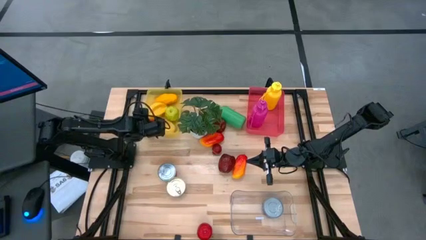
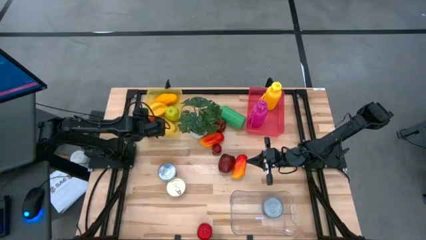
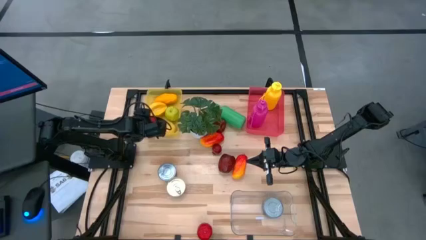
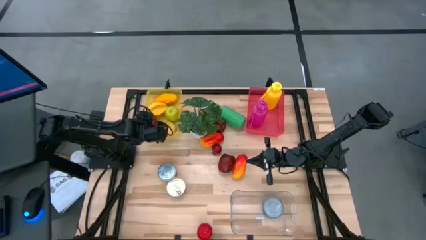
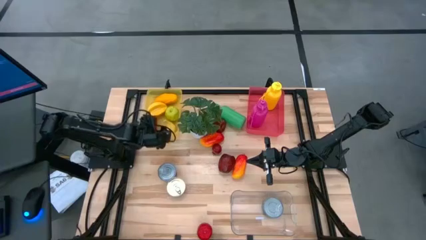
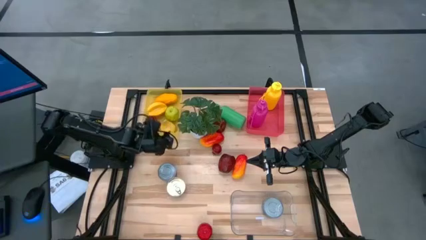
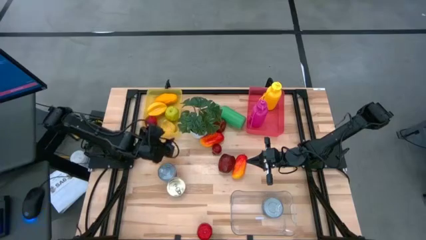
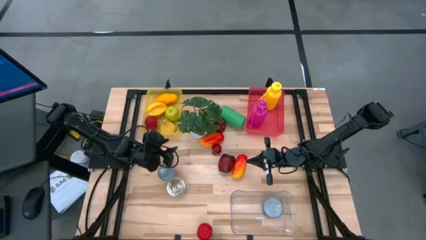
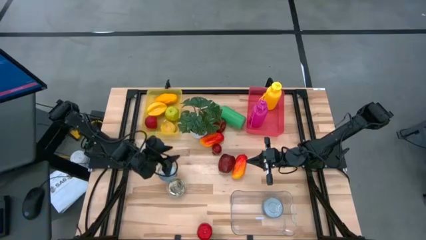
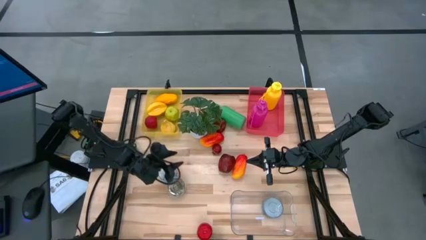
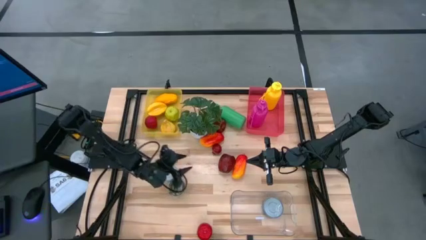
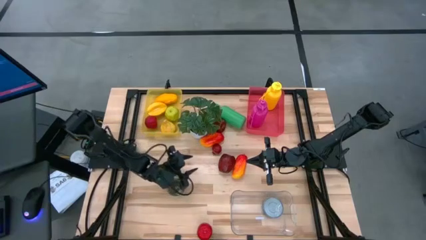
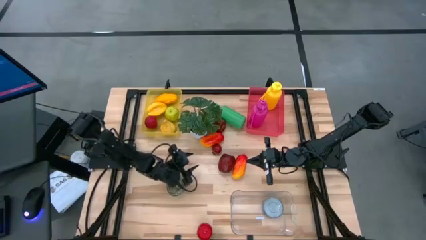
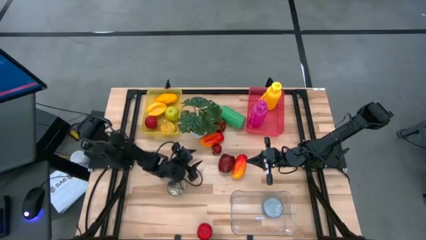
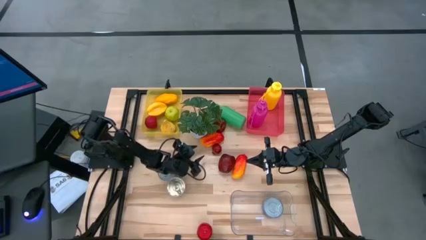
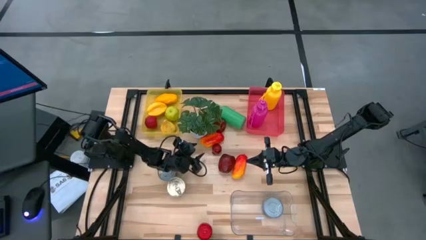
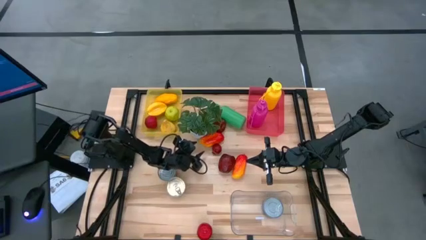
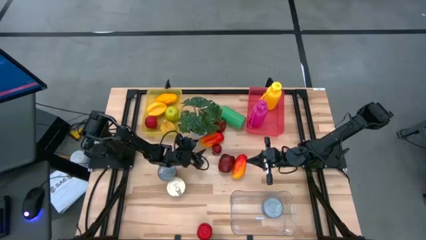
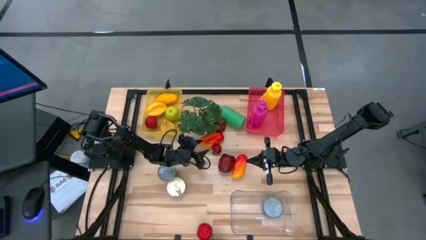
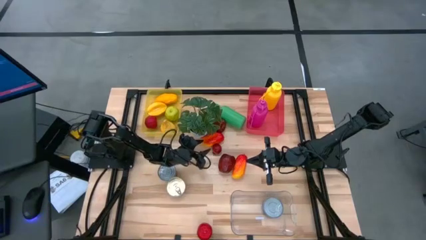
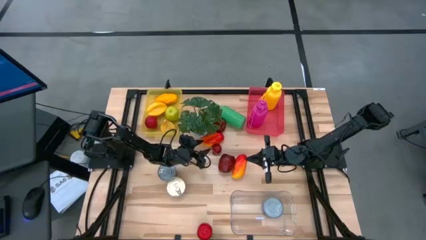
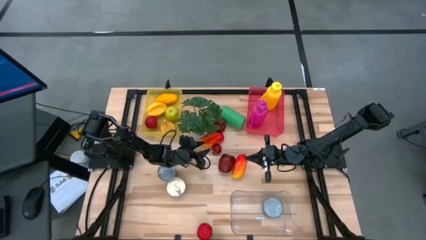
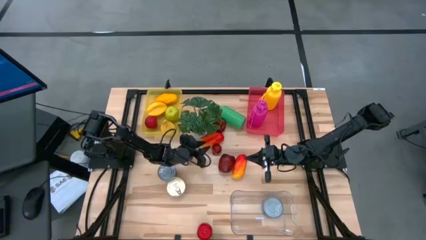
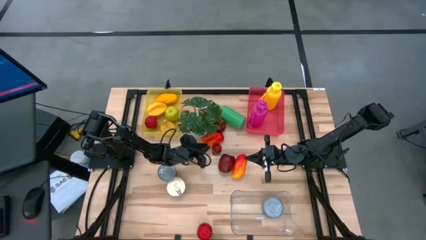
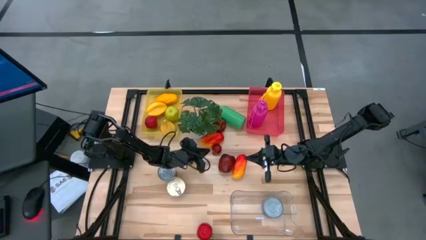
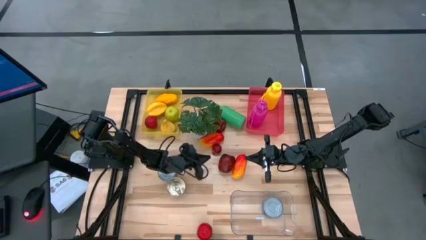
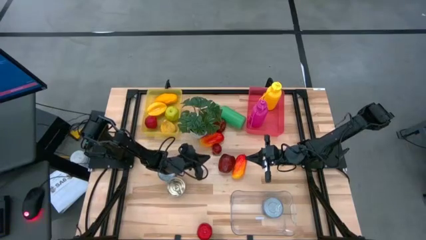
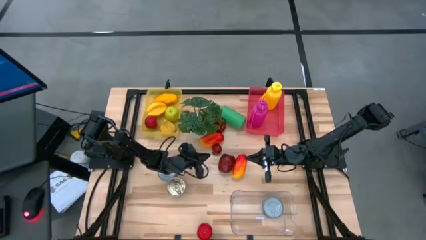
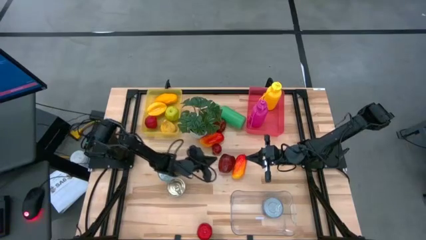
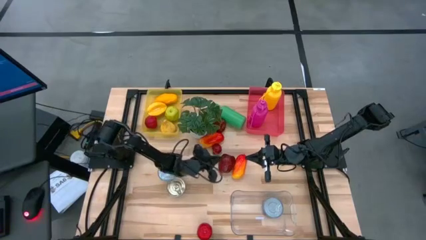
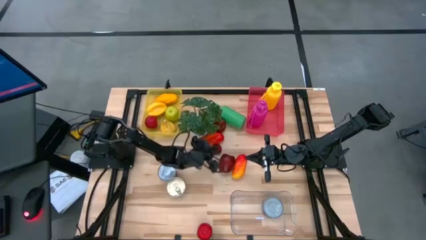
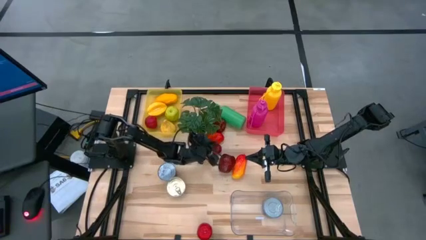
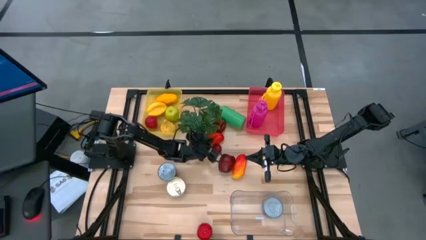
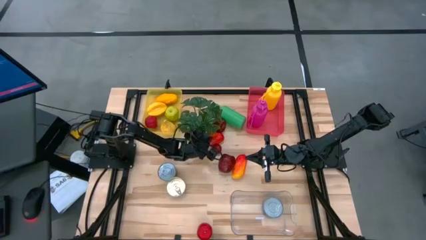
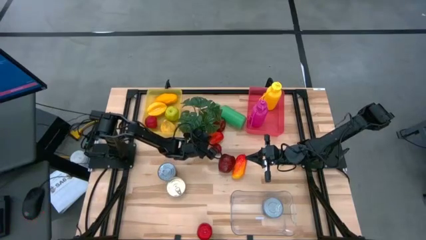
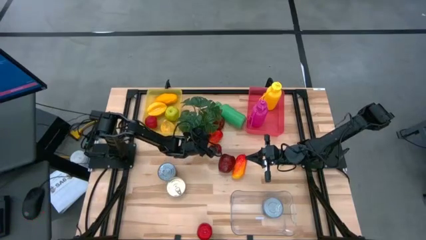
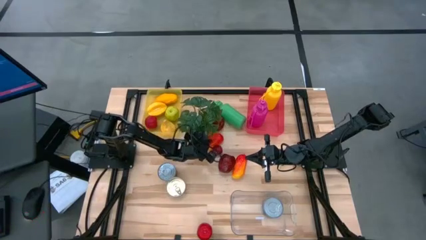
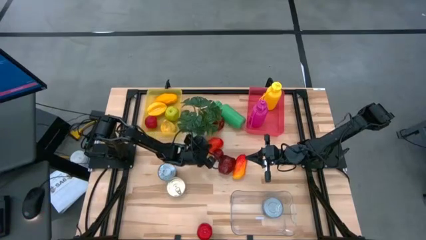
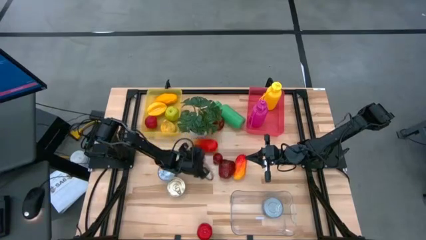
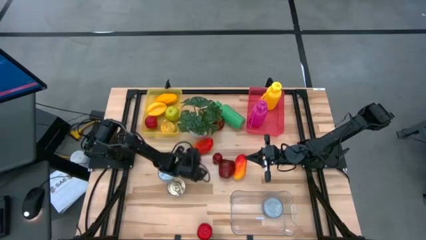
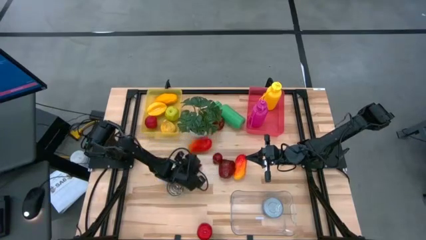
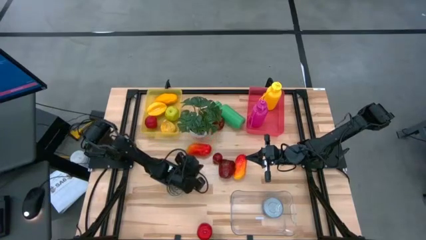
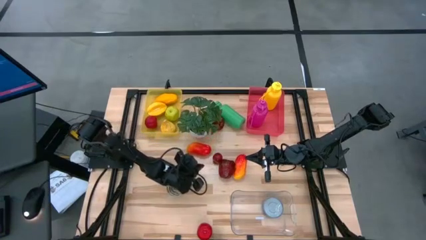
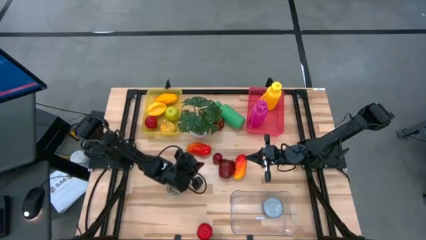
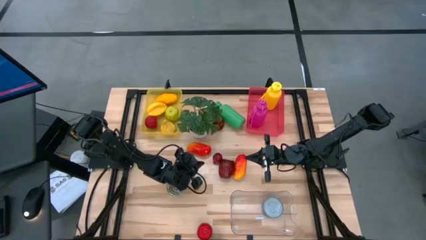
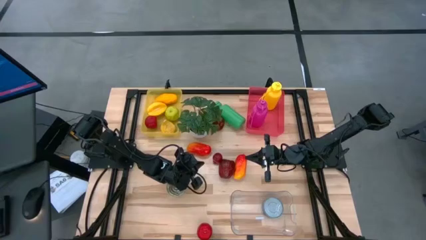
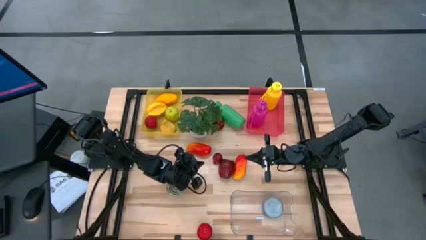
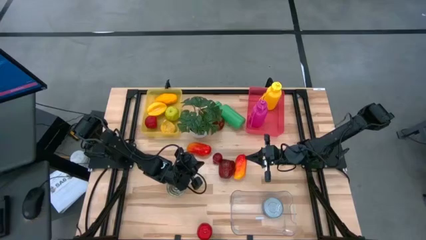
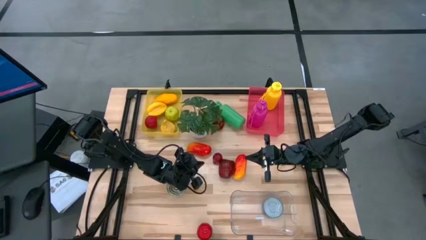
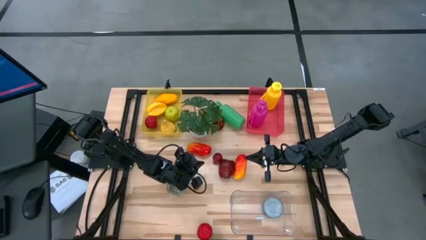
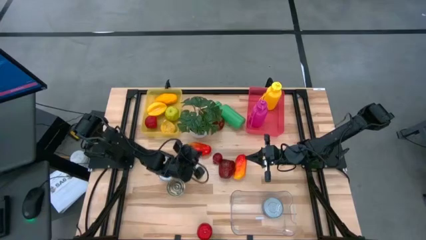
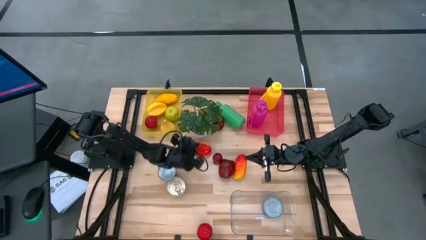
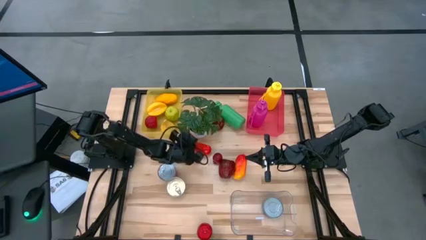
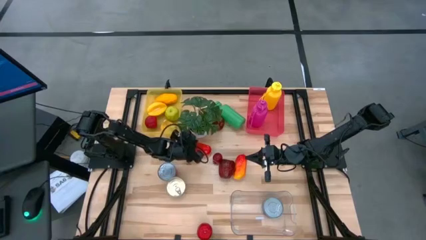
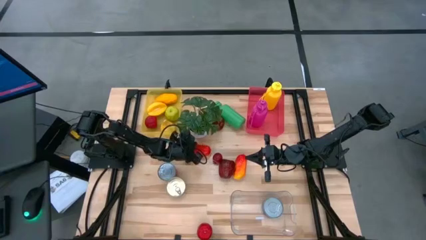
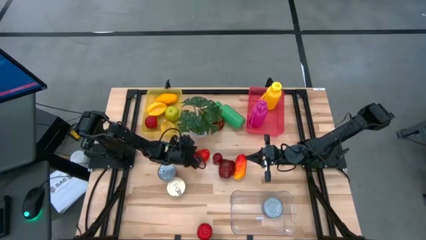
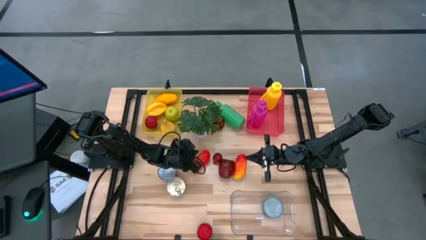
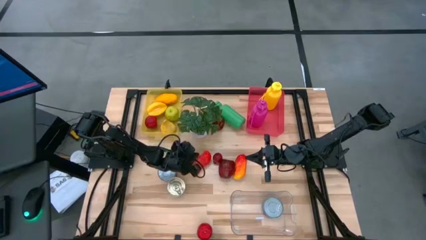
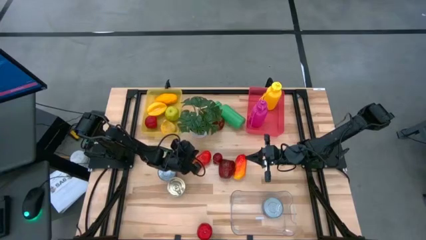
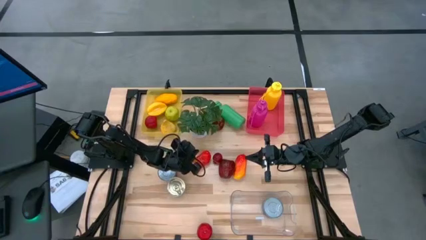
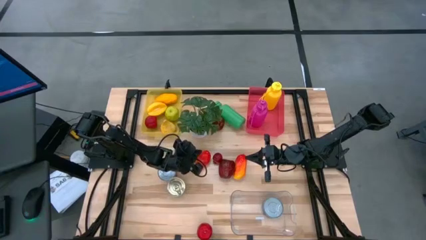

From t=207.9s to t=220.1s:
Task: Pick & Place Food Item
Put the orange mango into the yellow bin
